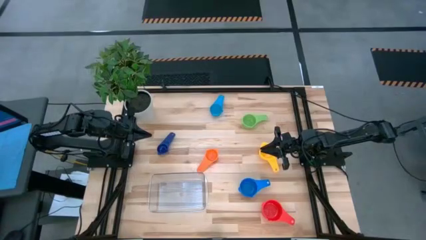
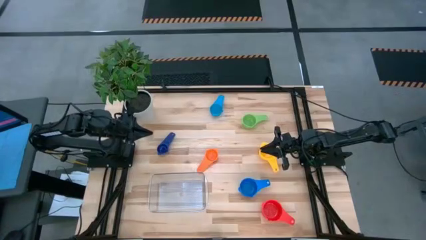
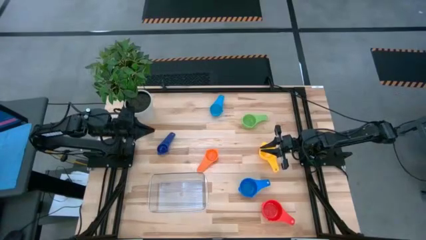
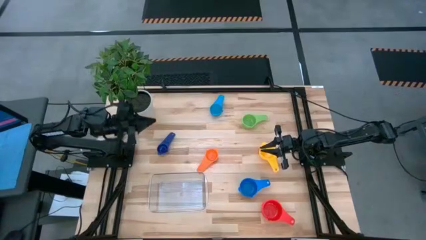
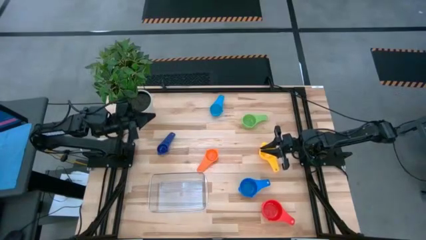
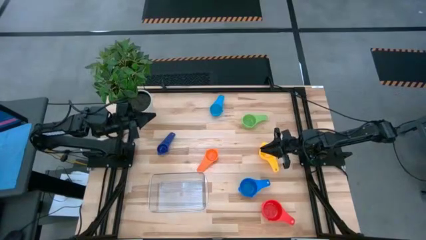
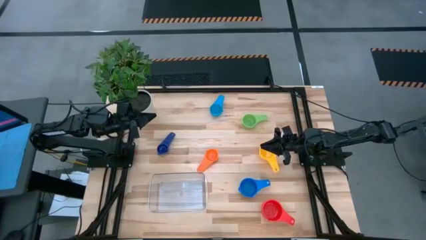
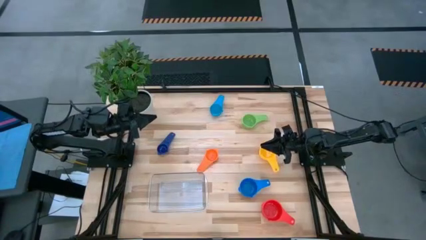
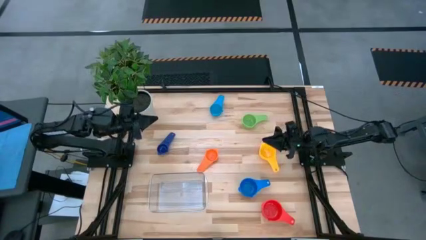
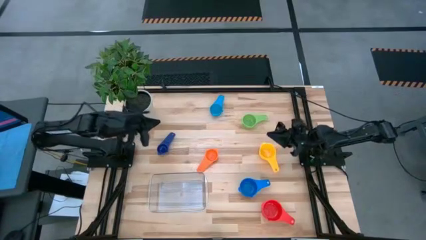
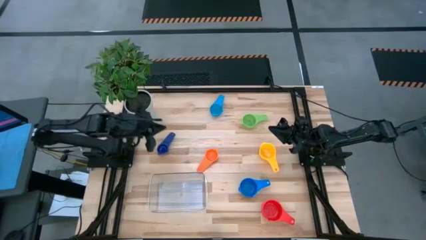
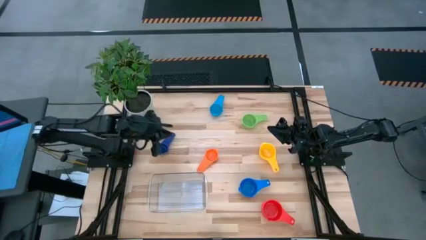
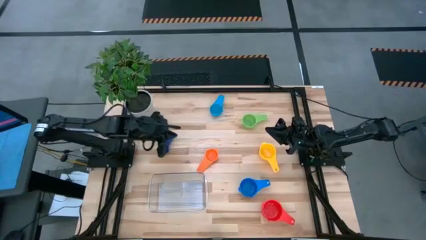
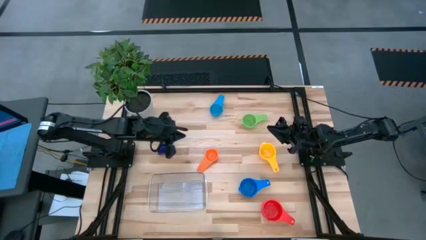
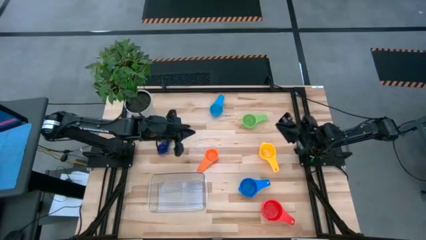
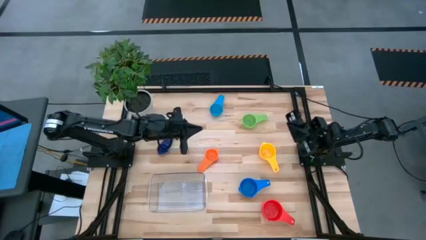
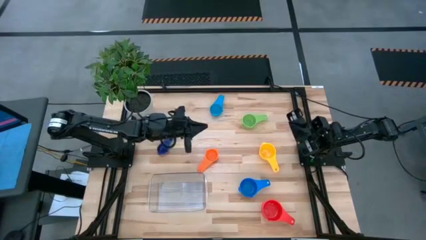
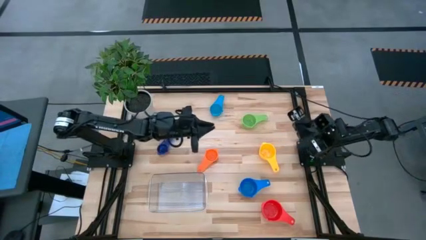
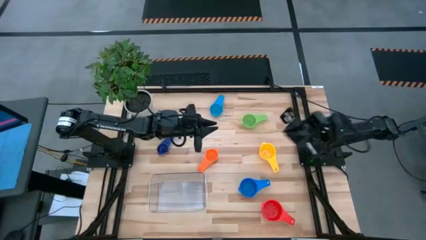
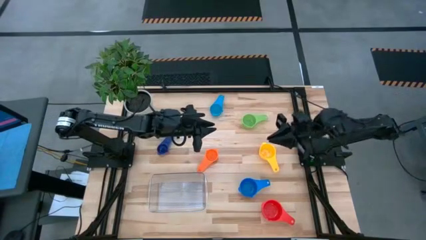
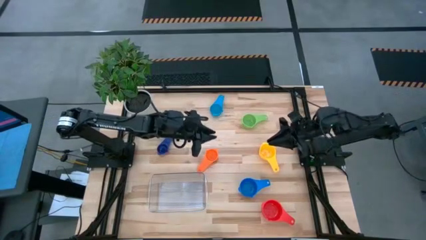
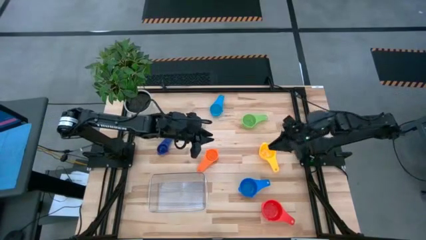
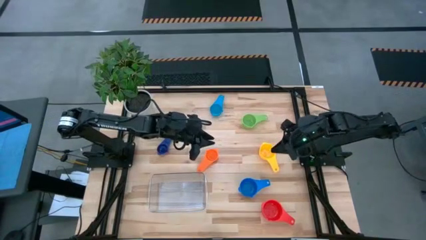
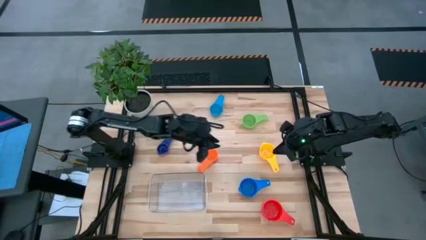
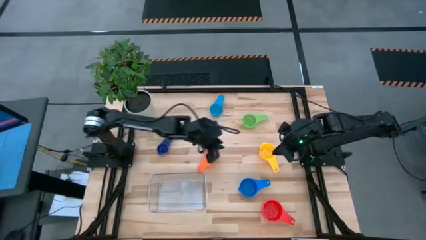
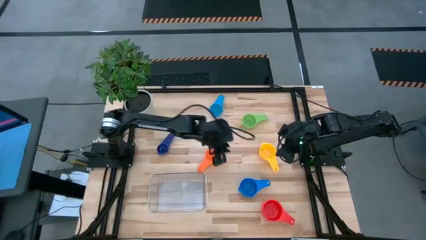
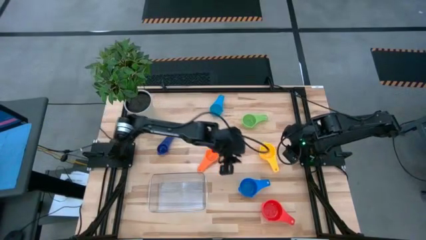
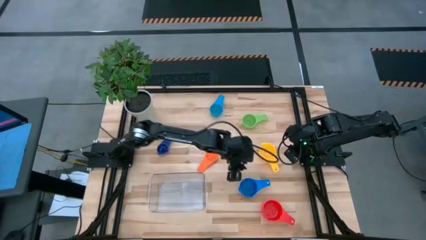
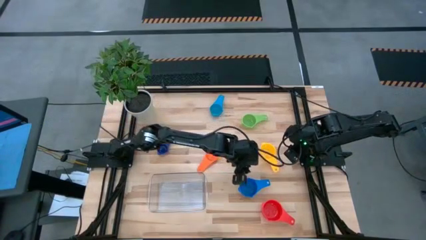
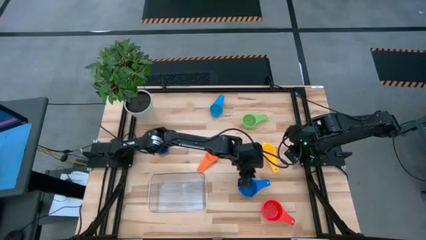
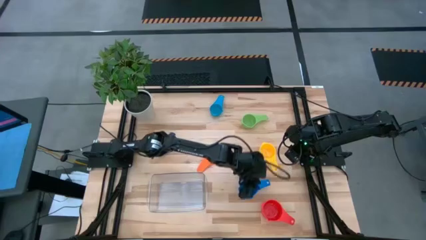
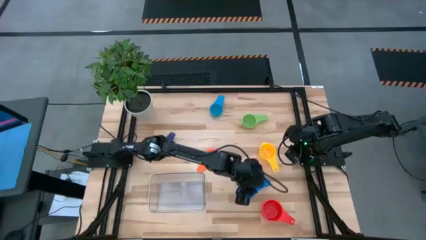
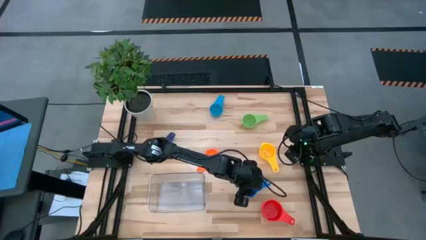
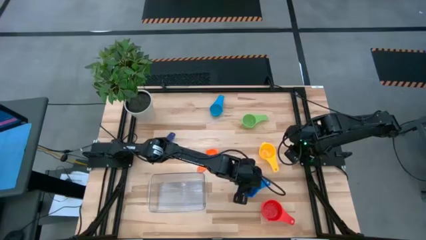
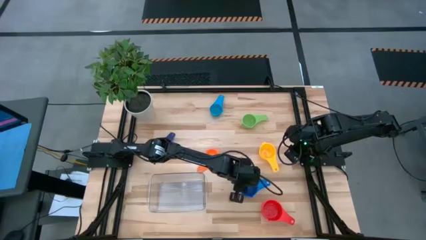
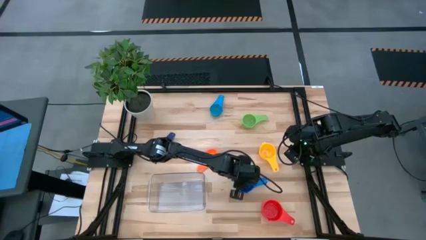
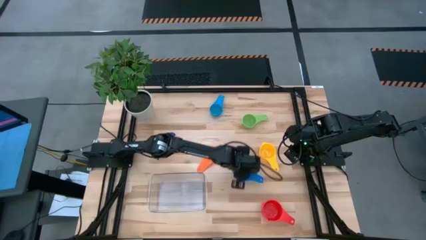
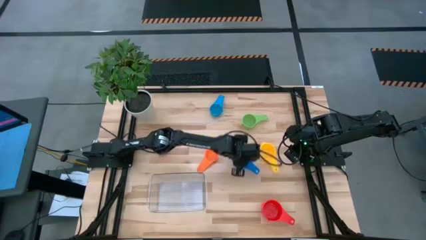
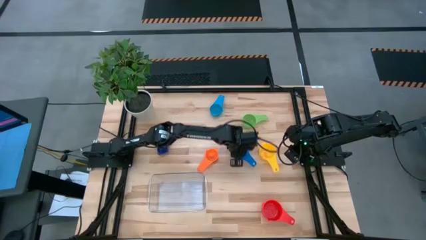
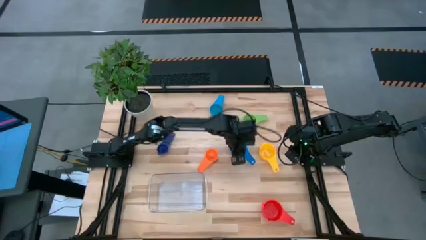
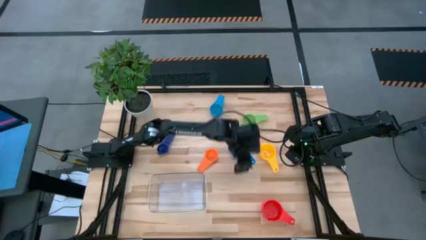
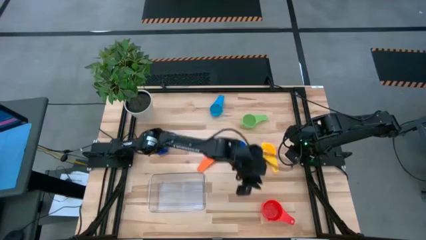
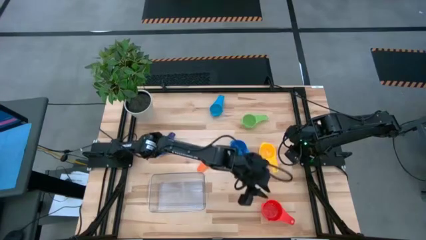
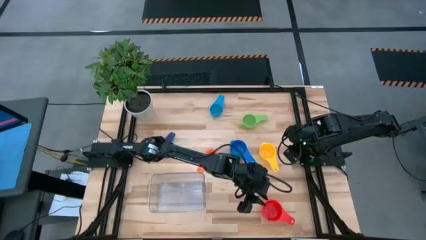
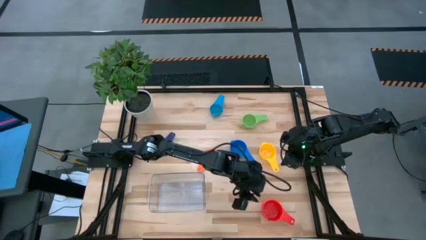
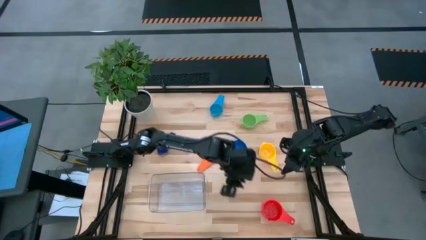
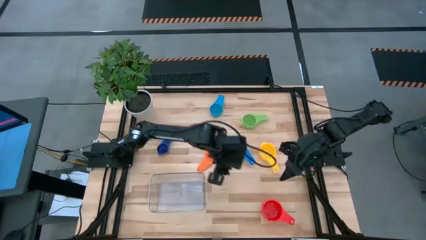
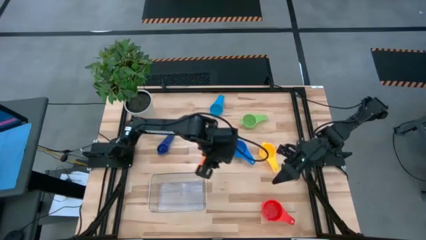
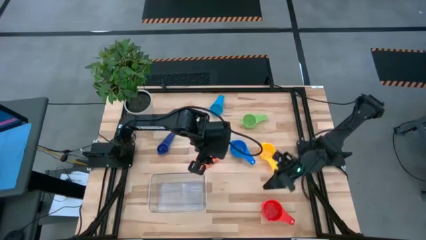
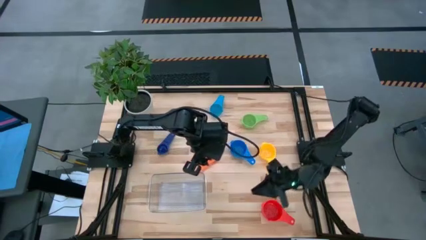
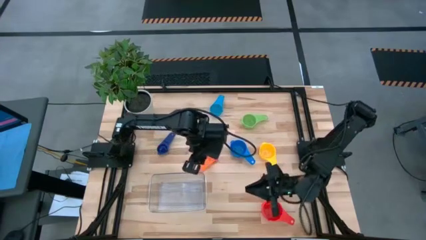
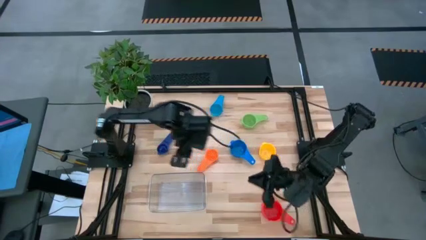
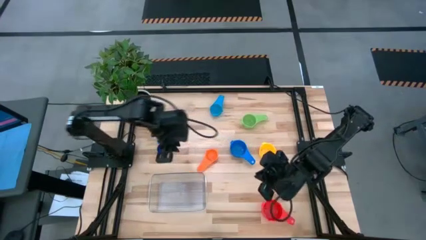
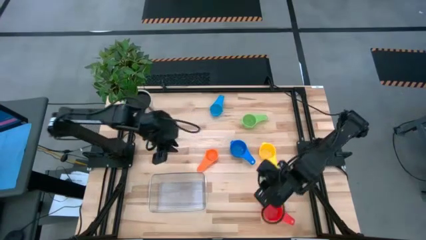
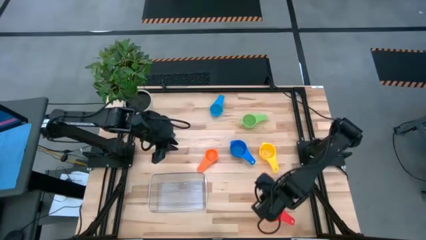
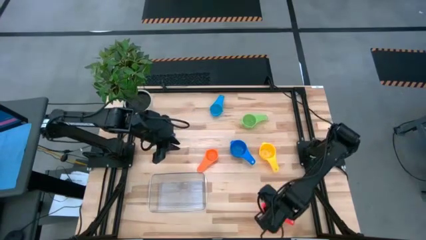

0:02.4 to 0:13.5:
Task: Nest measuring cups in basket
Put the red measuring cup into the transparent bin

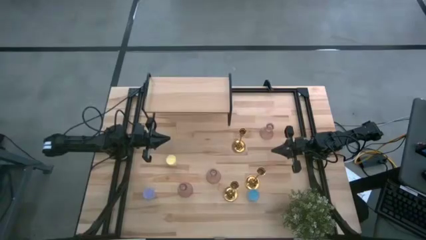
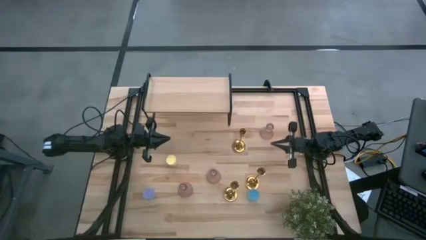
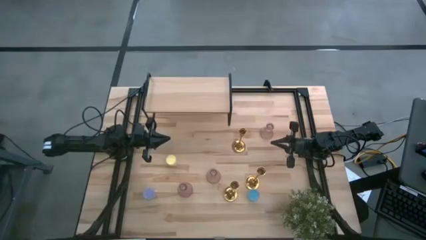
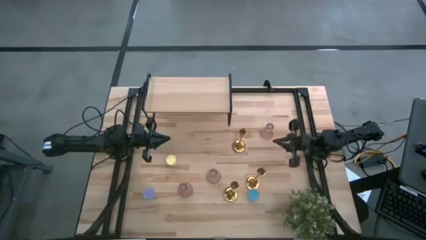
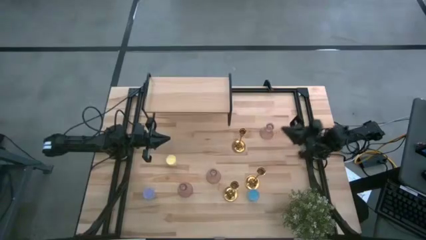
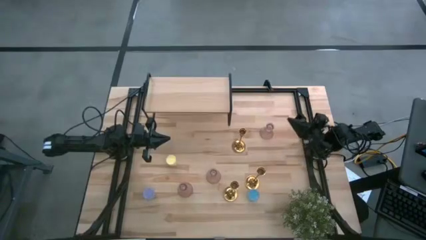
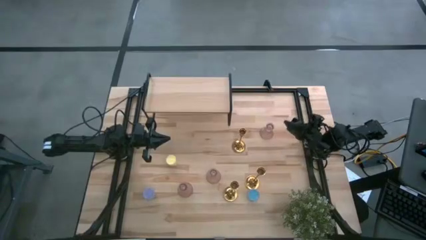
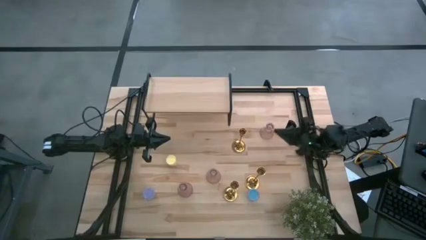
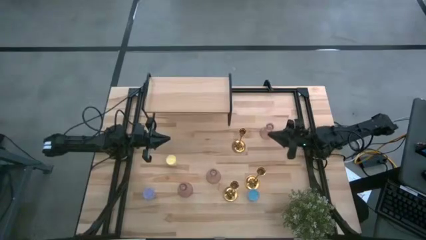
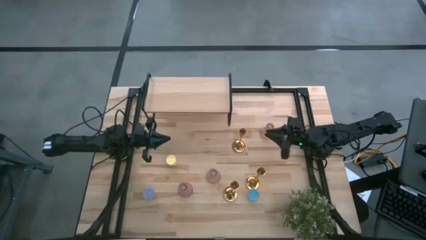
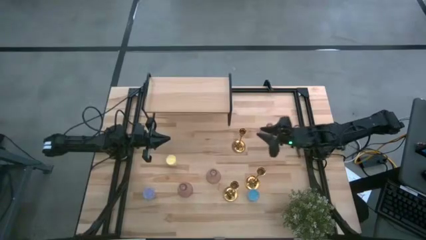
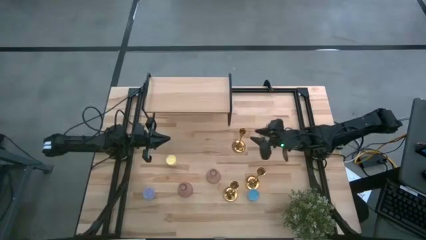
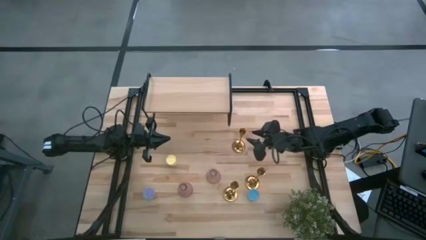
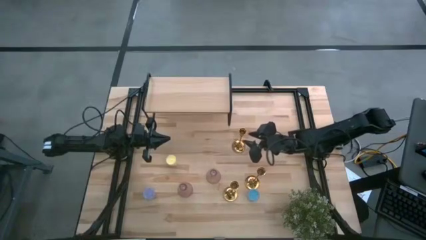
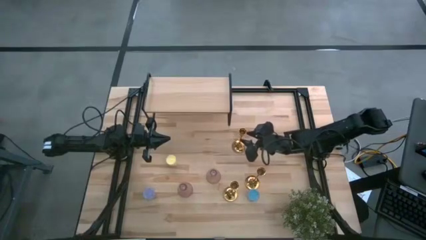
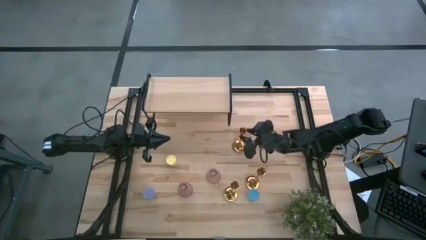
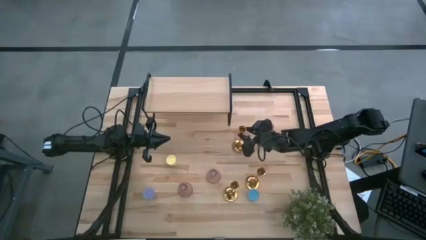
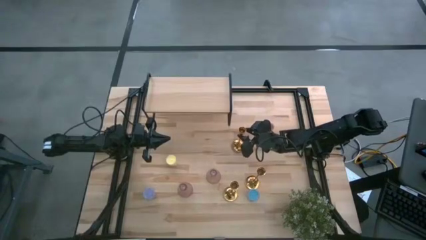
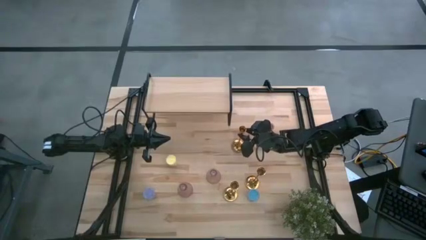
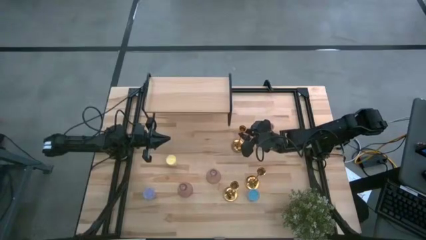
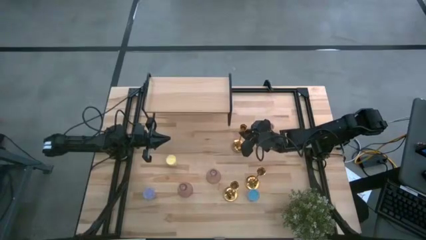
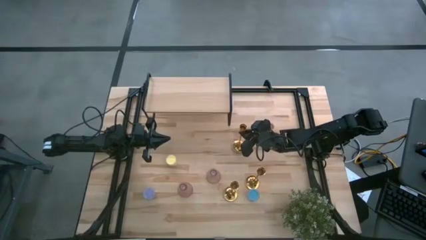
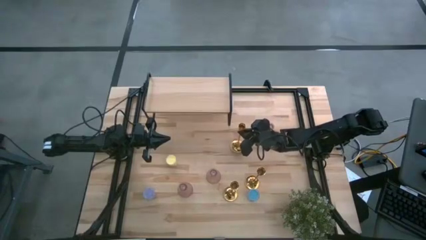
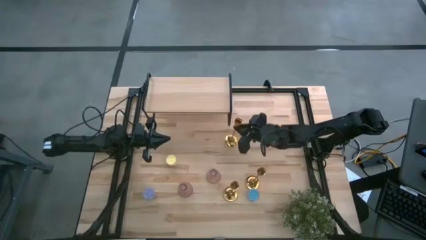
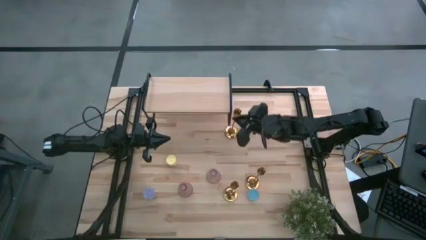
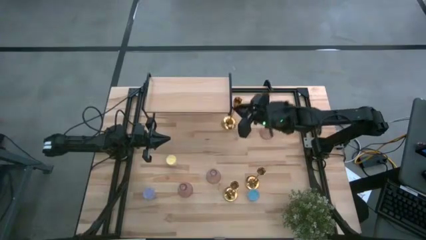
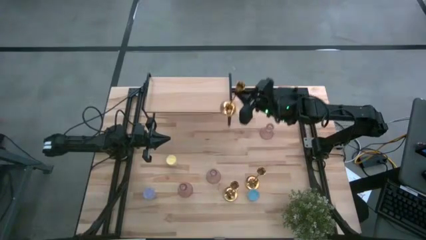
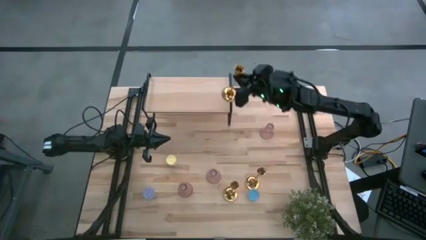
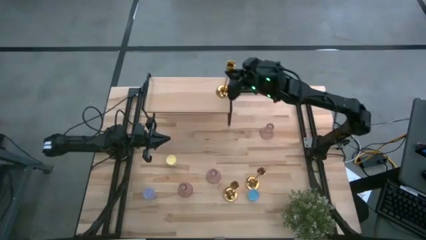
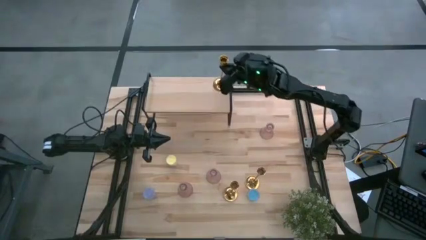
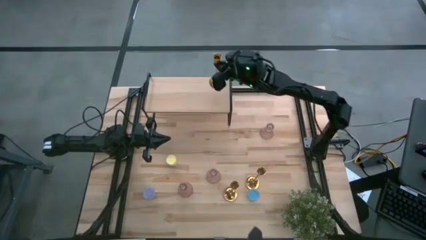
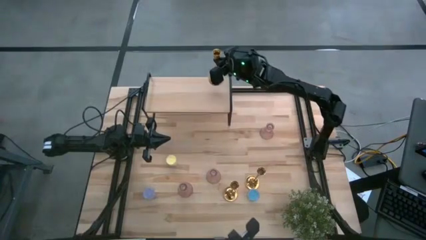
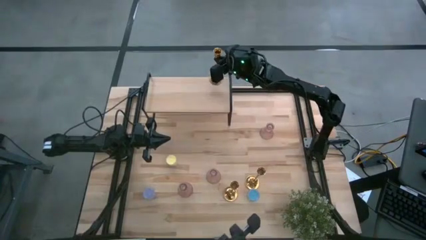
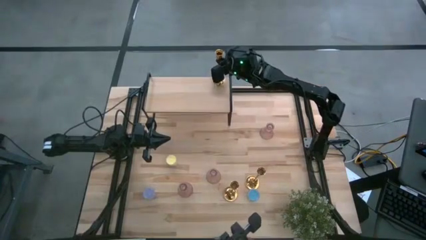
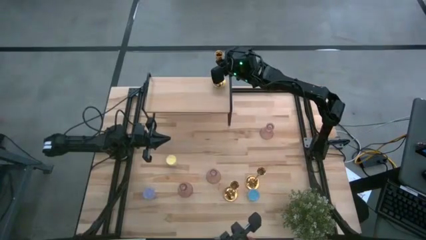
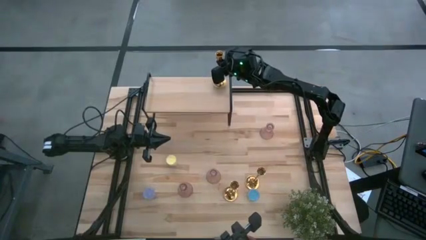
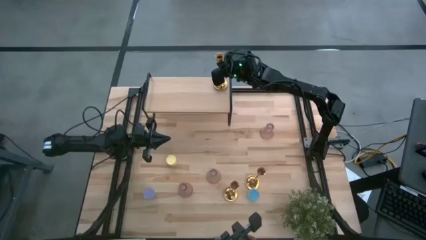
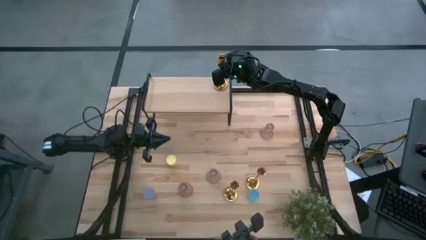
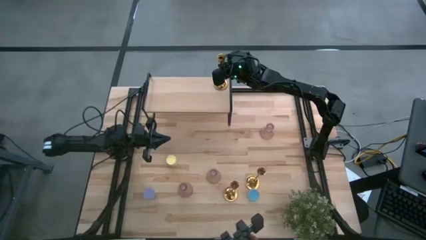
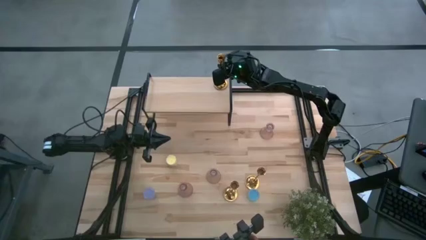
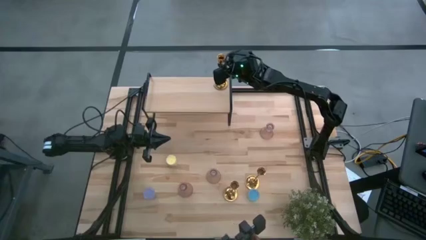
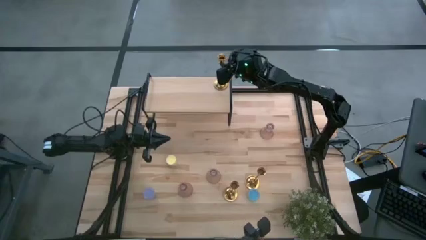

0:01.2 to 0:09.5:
Task: Pick & Place candle stick holders
Put the top gold candle holder on the shelf
